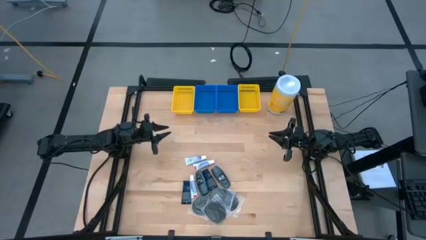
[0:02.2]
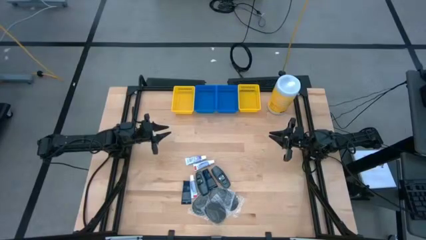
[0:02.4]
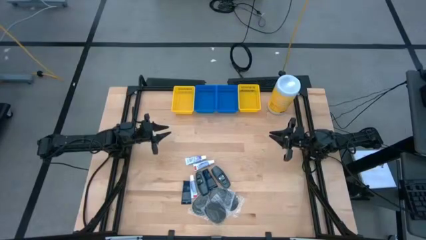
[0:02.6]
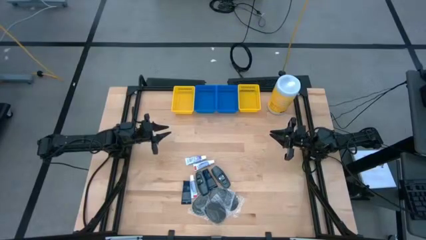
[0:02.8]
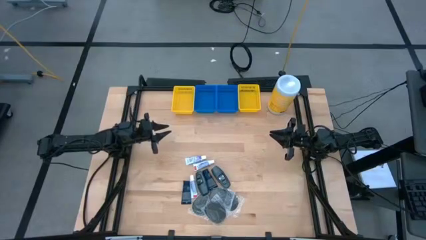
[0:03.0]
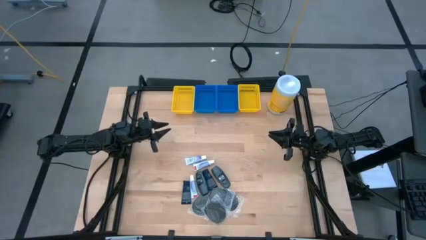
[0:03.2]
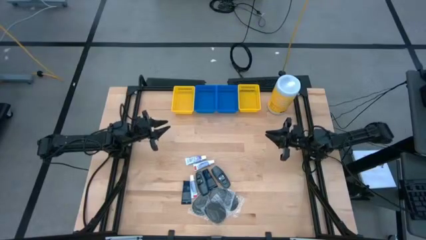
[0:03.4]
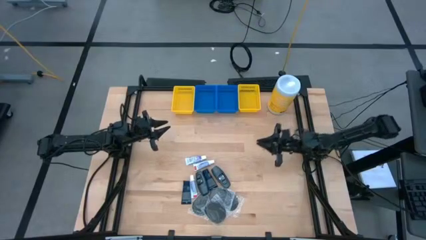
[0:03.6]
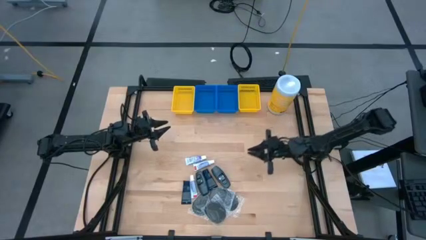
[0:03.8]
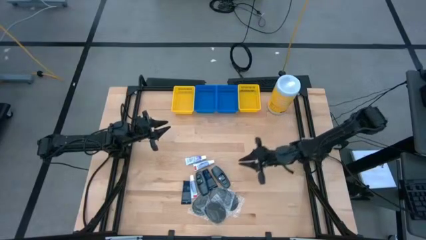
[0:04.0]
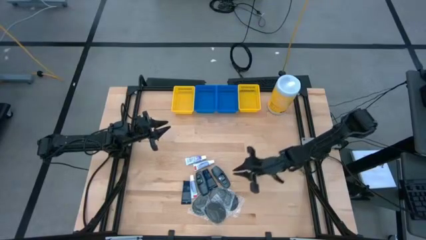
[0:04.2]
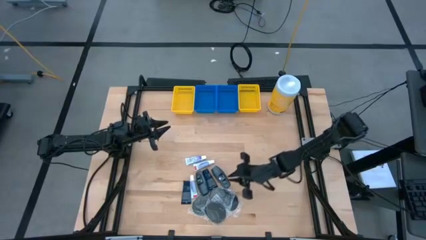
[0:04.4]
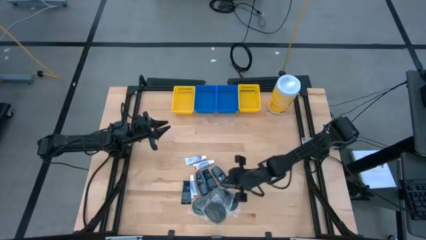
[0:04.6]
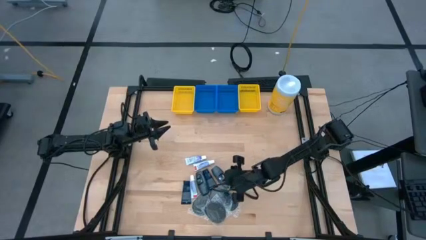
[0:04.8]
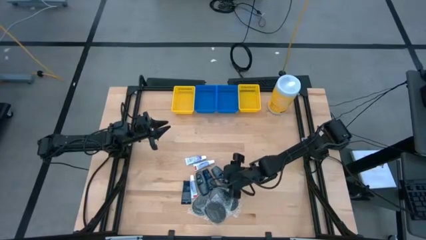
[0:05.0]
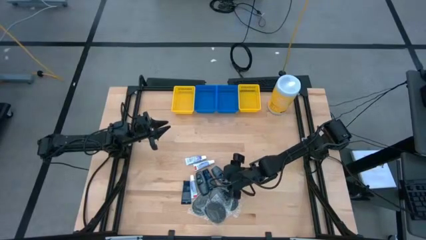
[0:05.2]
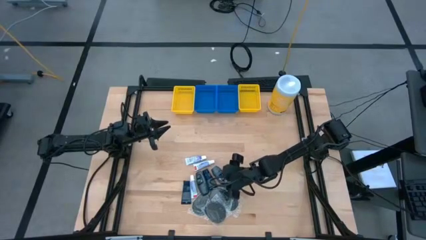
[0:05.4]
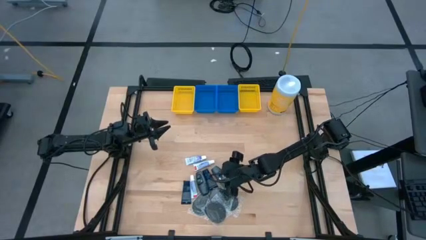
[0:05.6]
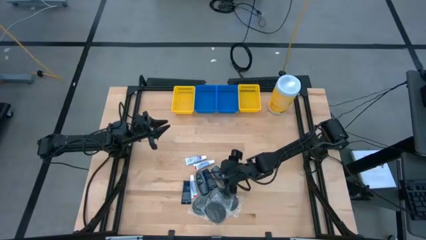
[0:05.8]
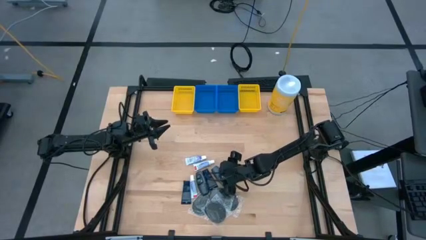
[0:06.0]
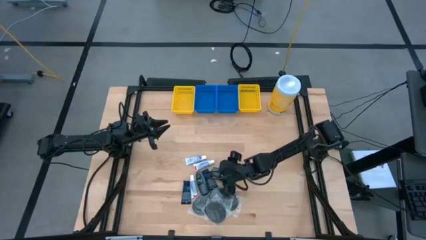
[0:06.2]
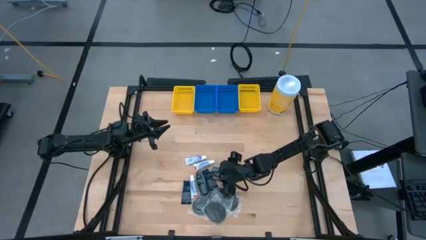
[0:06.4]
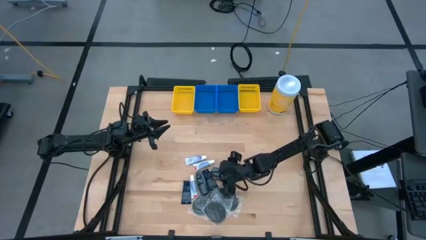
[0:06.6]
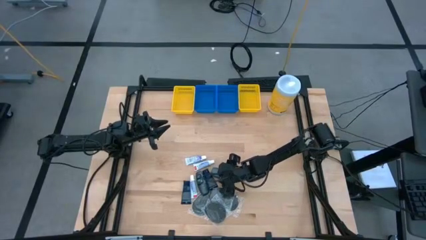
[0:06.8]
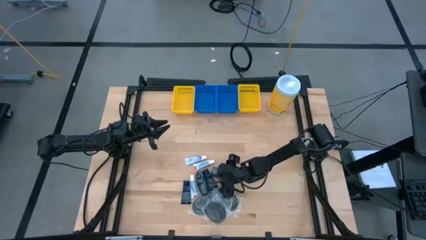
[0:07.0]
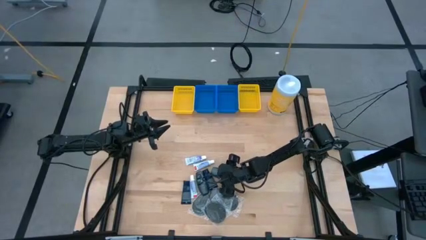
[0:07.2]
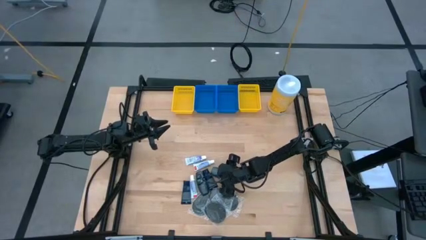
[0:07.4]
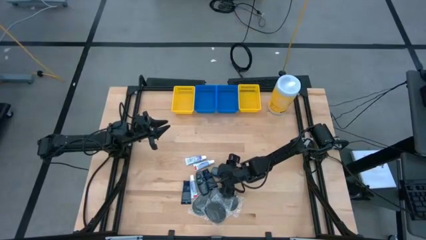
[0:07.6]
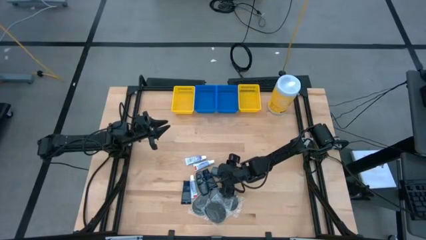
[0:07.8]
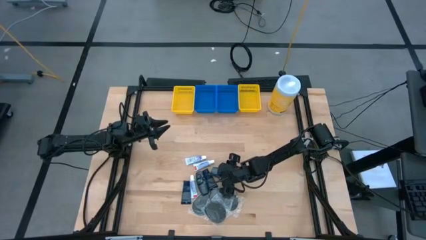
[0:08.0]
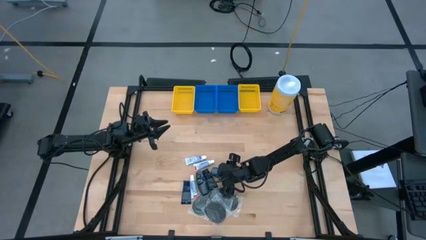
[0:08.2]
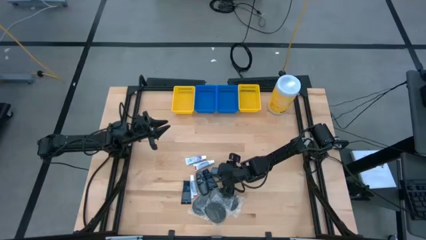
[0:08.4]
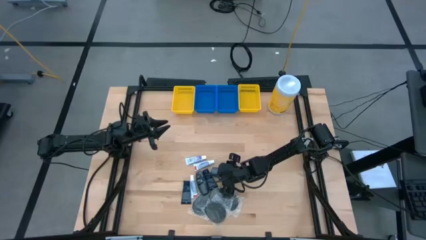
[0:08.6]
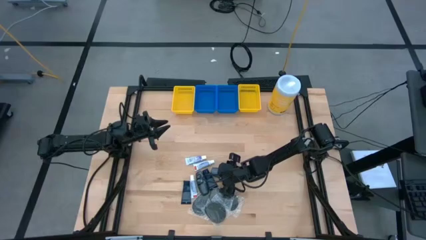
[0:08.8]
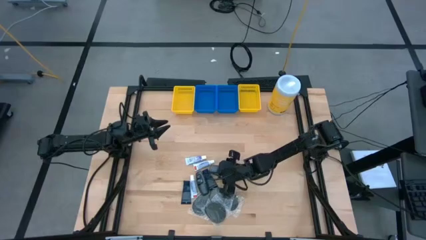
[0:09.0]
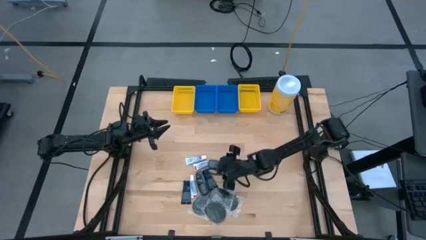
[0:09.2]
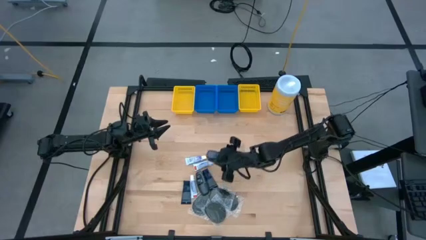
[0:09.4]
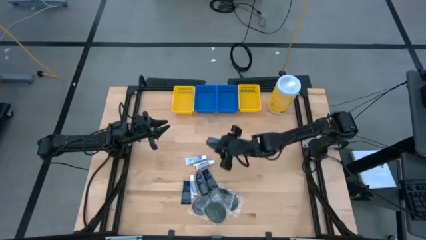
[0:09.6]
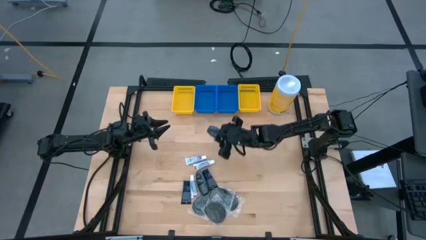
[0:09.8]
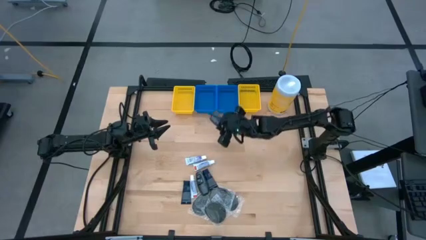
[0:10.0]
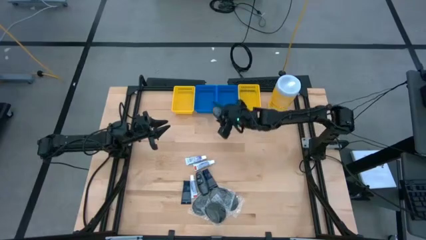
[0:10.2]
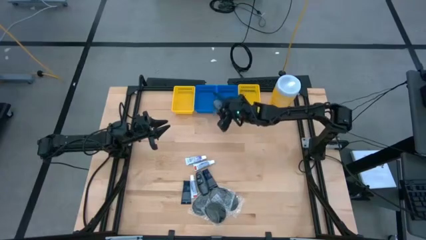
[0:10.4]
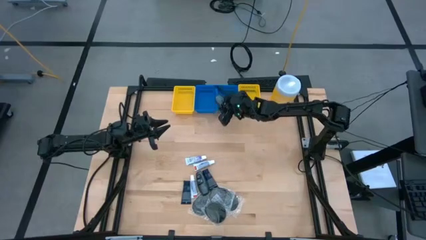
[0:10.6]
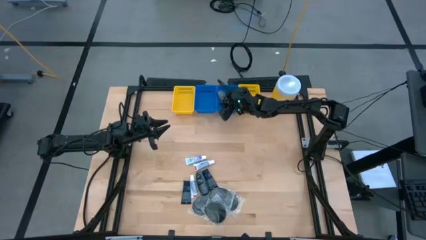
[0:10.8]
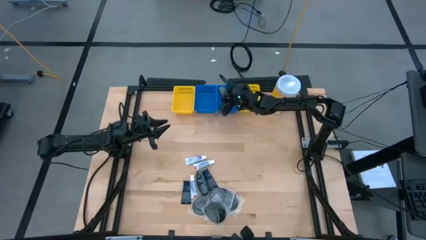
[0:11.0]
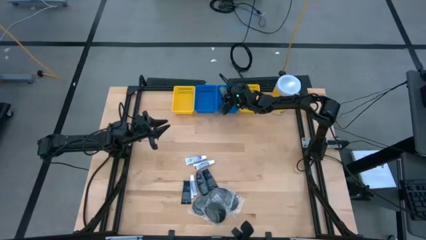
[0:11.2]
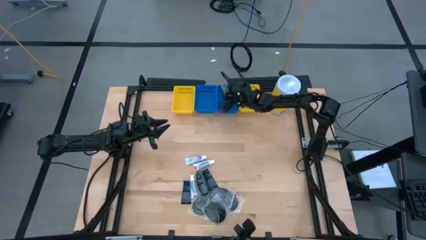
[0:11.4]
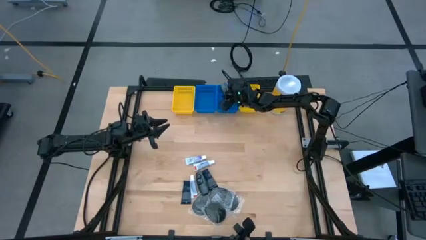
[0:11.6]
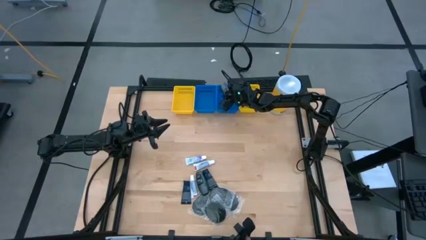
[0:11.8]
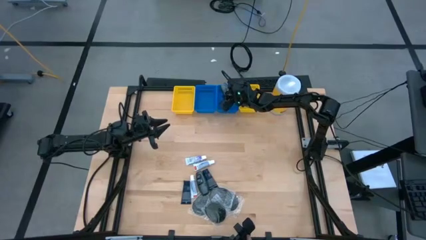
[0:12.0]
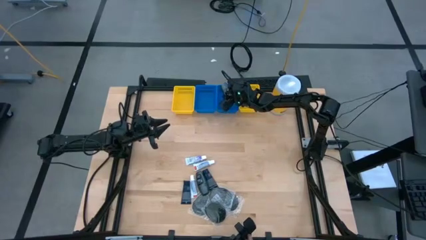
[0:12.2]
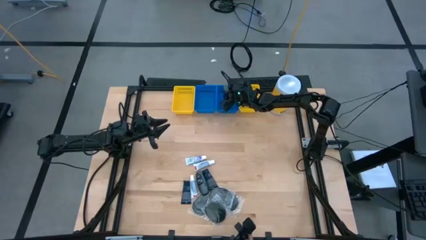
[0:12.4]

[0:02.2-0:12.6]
Task: Pick & Place Travel size toiletries
Put the black deodorant into the right blue bin

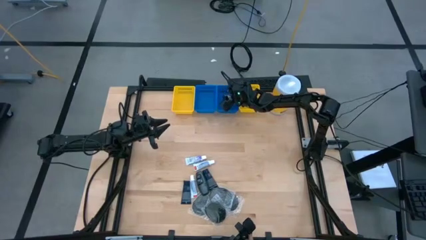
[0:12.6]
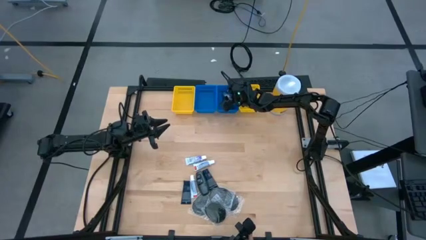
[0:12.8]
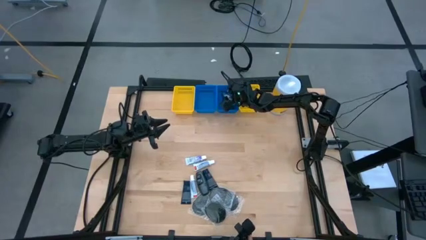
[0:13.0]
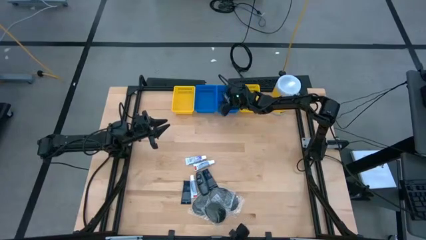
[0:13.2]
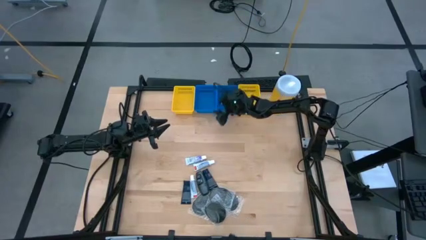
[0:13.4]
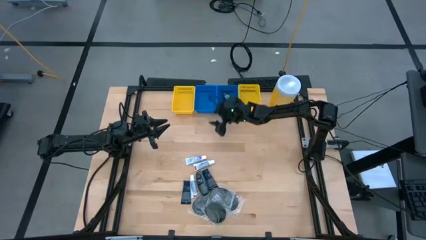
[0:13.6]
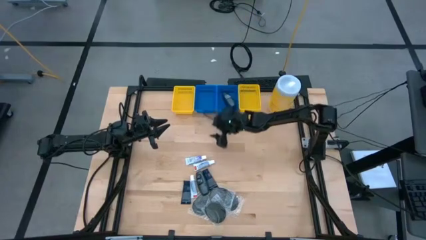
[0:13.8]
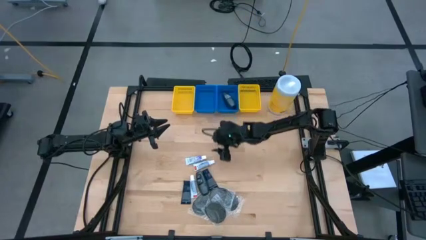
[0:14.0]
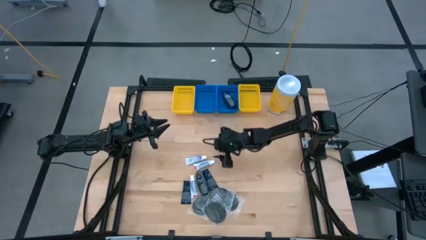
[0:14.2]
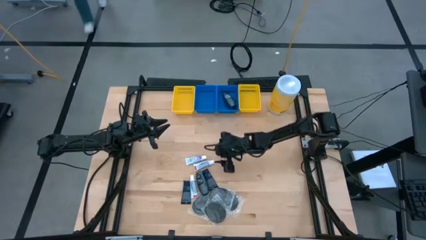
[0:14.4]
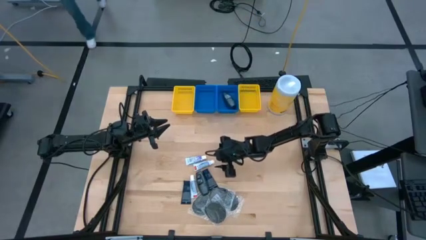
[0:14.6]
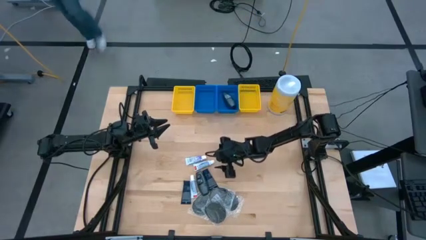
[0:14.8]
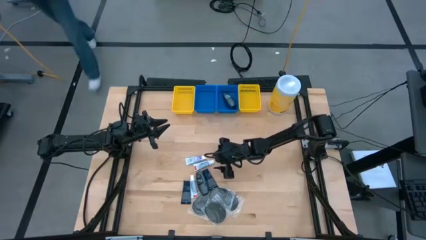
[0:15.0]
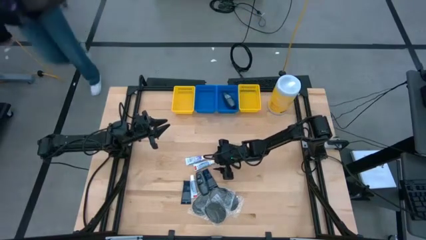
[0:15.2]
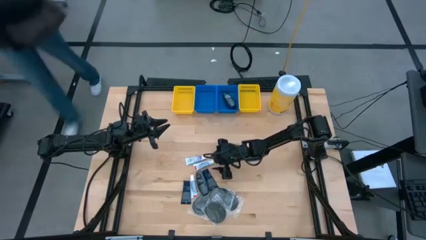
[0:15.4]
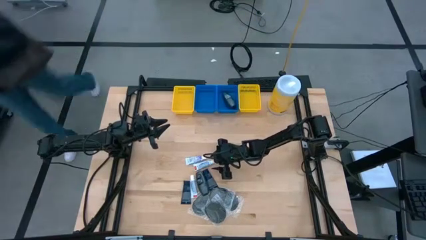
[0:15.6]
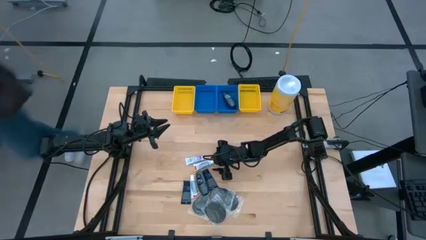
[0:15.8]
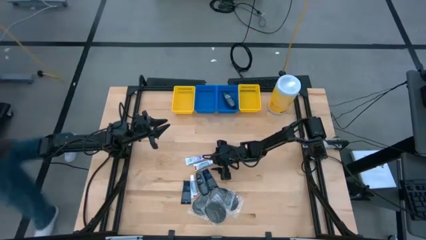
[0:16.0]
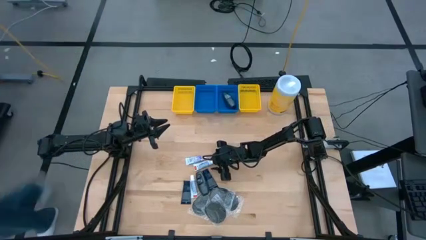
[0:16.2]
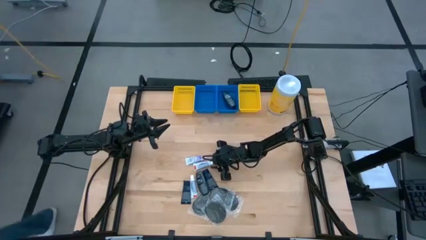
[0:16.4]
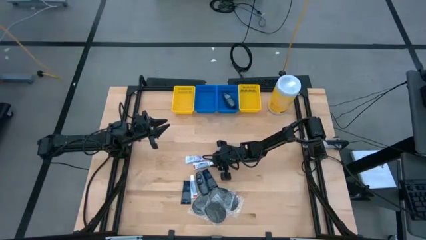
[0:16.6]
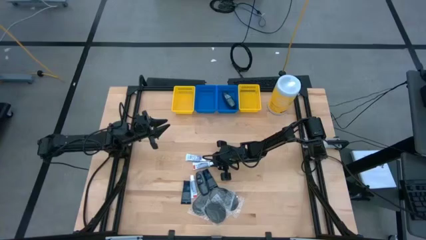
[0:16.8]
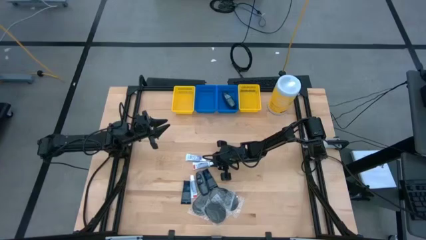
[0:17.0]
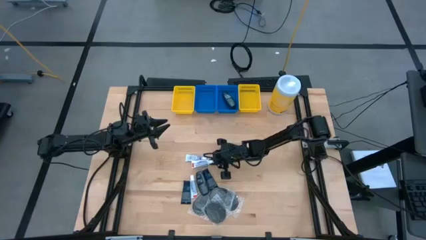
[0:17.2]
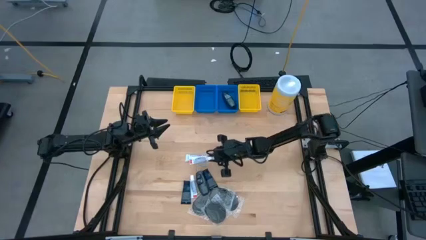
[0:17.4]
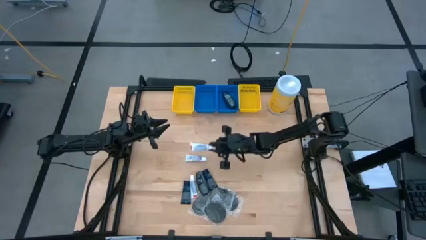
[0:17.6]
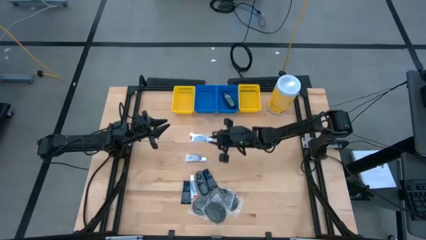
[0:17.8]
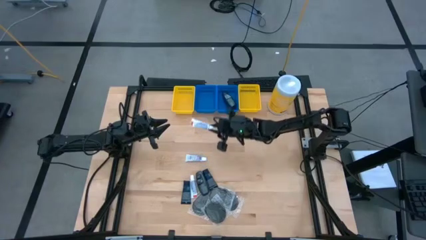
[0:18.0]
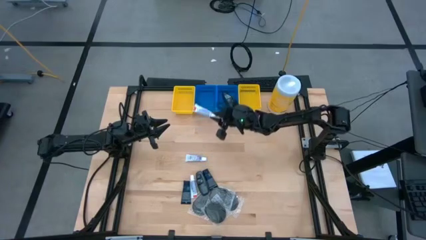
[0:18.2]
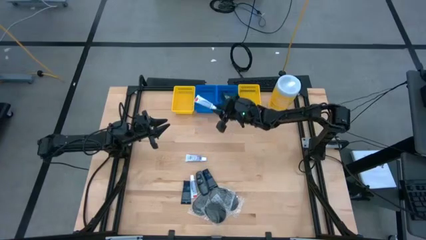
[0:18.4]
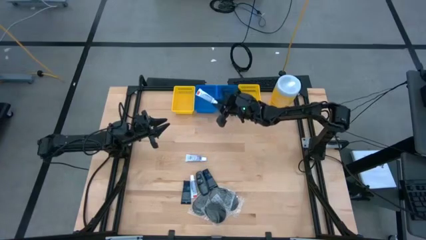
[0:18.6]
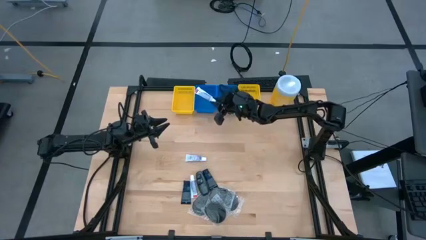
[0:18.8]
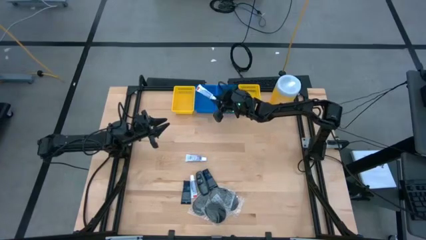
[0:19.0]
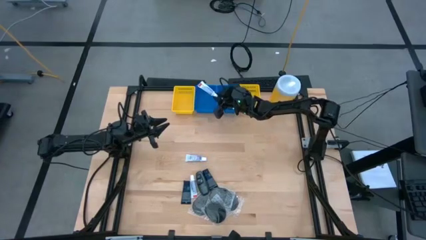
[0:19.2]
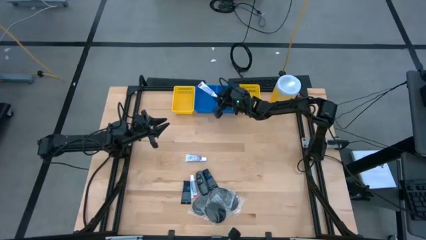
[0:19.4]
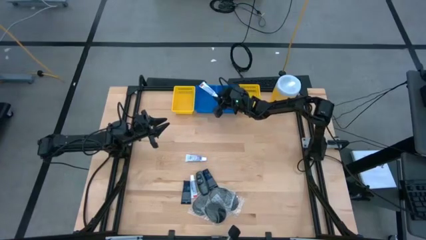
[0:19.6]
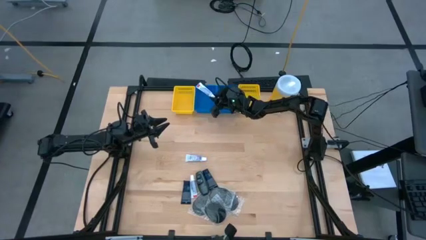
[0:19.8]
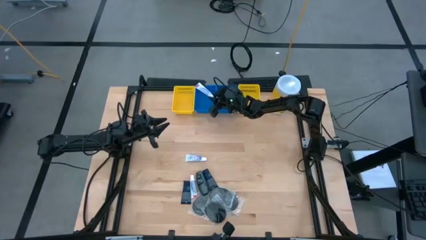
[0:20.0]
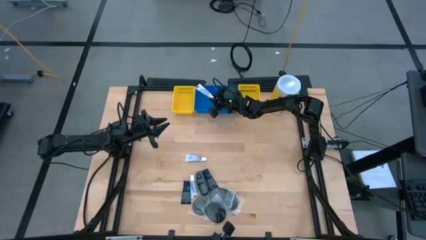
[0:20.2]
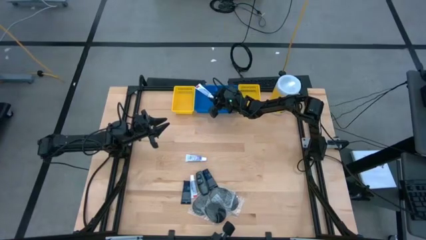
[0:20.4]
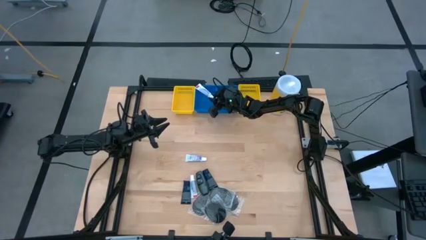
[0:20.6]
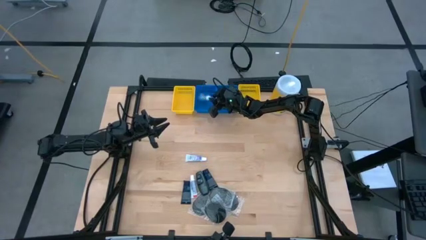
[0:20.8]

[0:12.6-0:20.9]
Put the white toothpaste into the left blue bin
